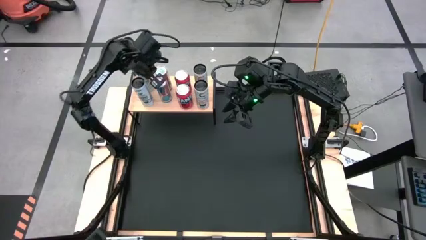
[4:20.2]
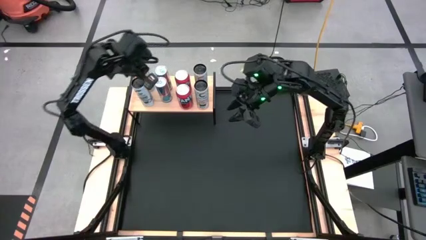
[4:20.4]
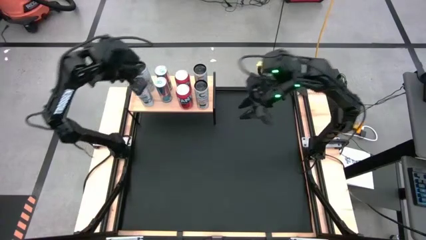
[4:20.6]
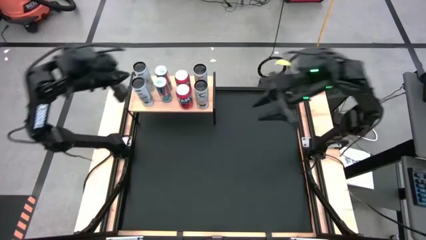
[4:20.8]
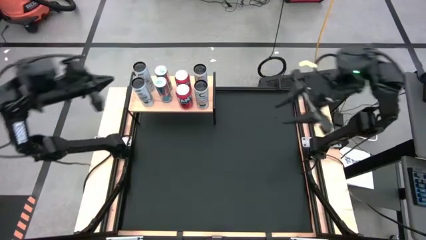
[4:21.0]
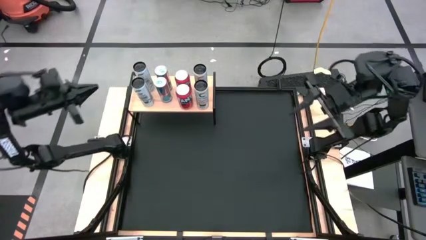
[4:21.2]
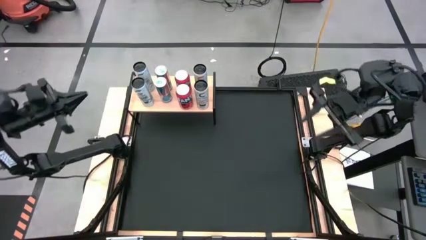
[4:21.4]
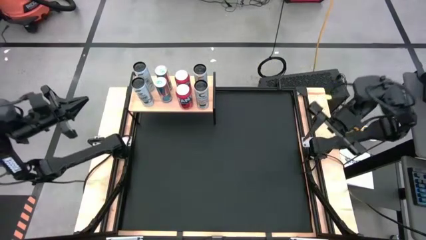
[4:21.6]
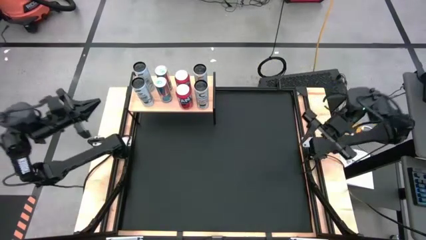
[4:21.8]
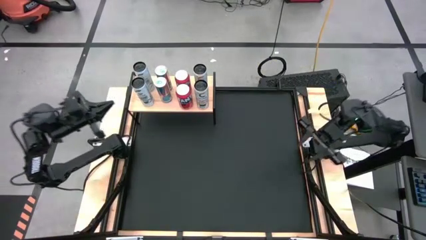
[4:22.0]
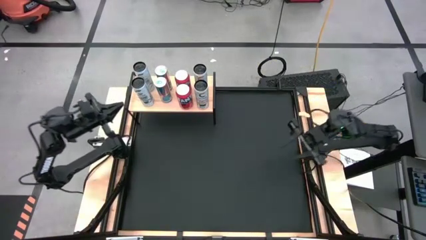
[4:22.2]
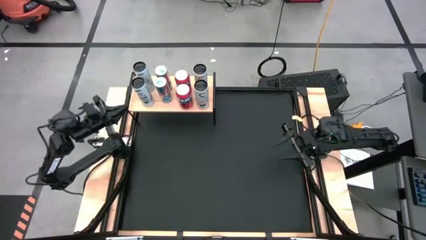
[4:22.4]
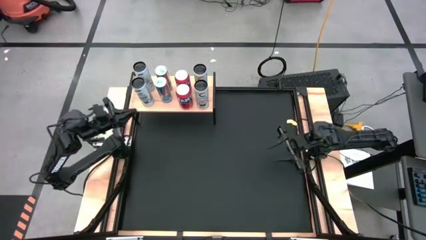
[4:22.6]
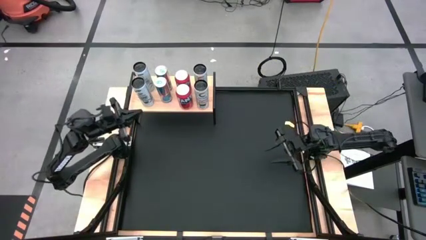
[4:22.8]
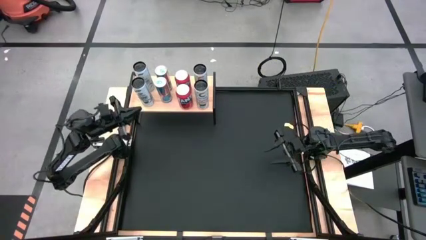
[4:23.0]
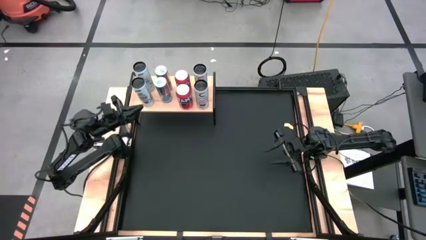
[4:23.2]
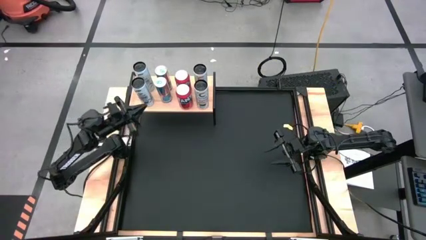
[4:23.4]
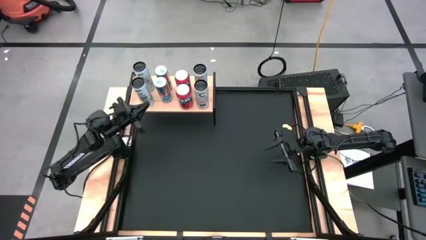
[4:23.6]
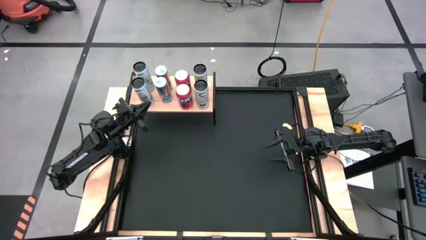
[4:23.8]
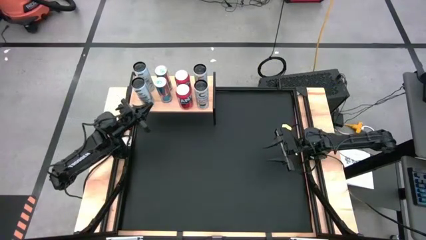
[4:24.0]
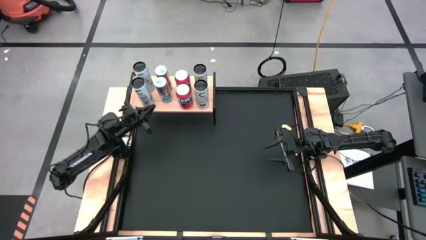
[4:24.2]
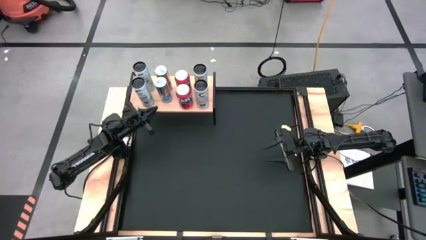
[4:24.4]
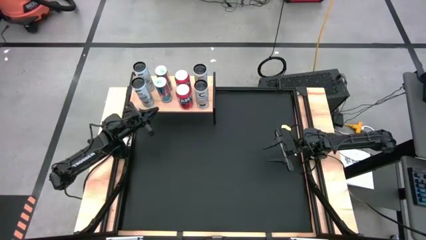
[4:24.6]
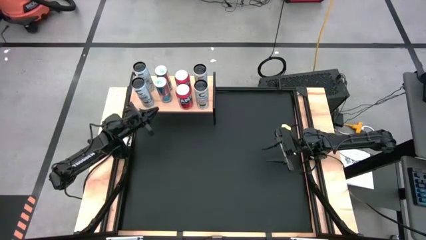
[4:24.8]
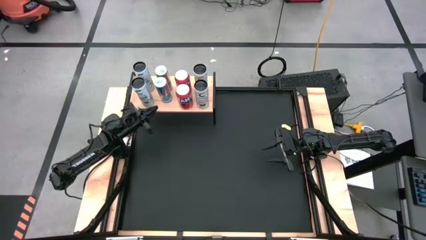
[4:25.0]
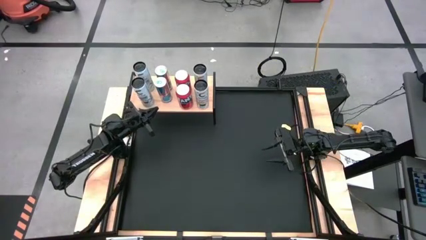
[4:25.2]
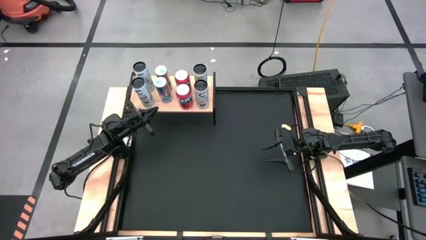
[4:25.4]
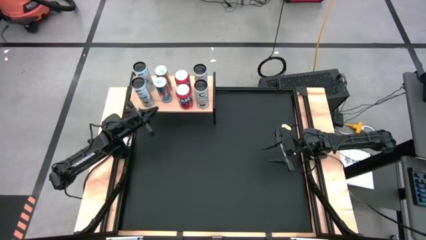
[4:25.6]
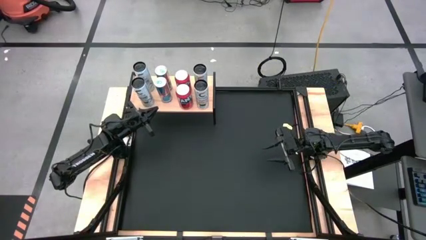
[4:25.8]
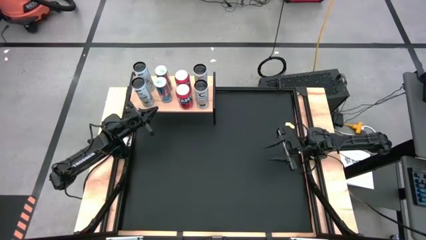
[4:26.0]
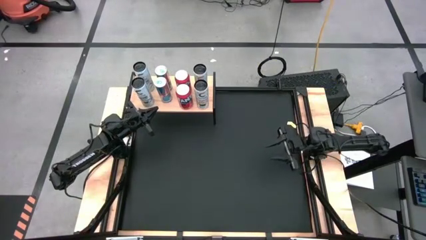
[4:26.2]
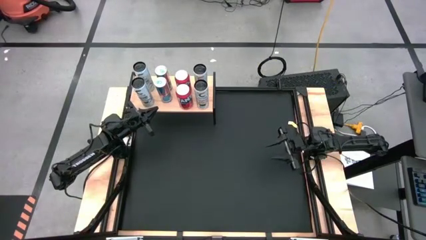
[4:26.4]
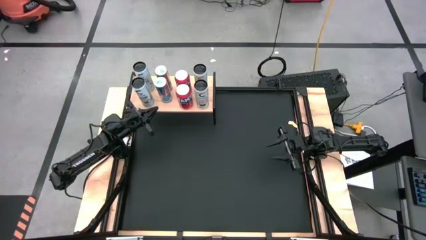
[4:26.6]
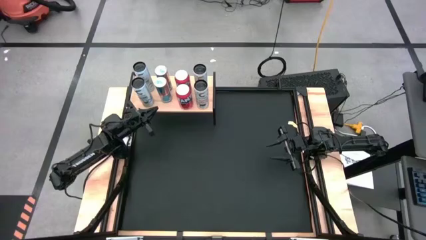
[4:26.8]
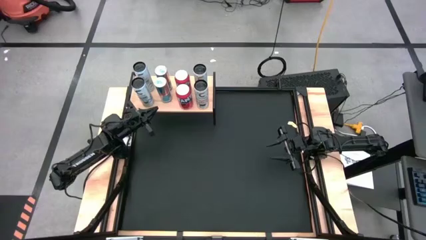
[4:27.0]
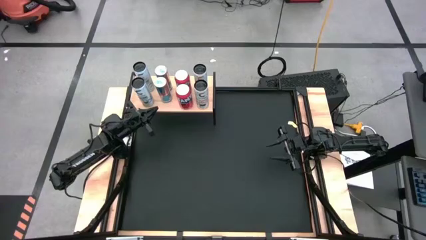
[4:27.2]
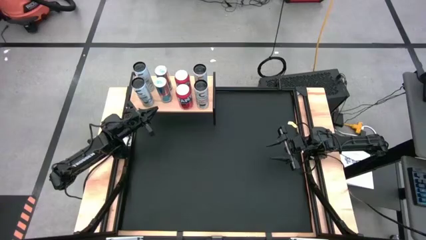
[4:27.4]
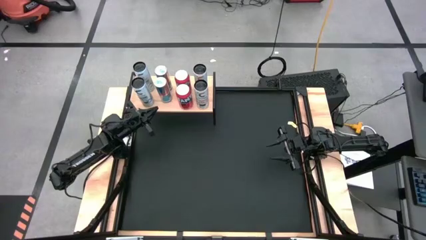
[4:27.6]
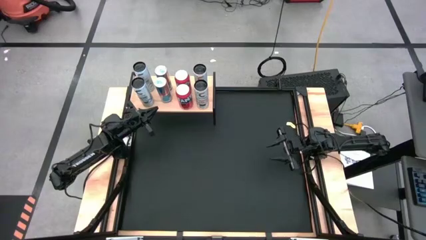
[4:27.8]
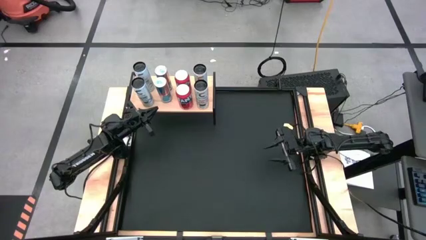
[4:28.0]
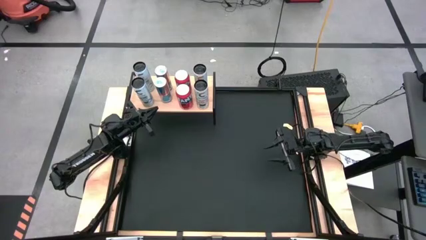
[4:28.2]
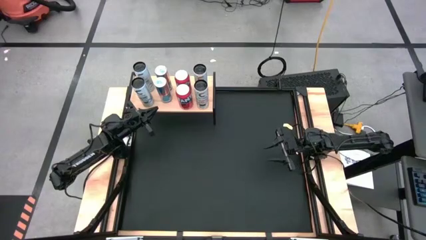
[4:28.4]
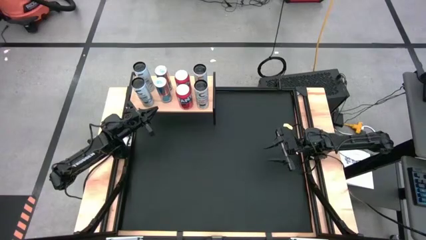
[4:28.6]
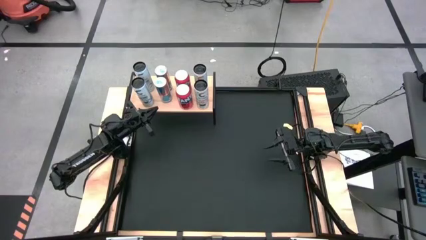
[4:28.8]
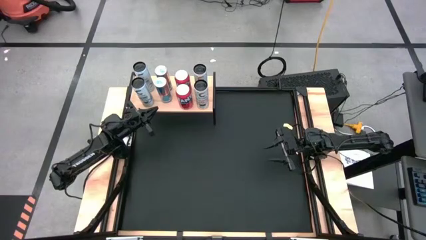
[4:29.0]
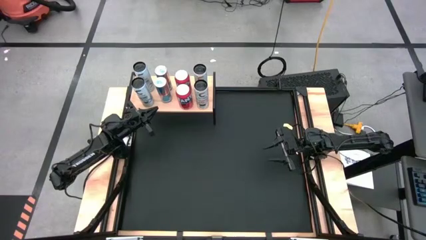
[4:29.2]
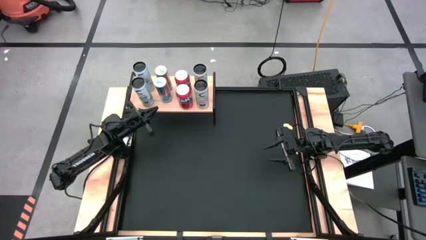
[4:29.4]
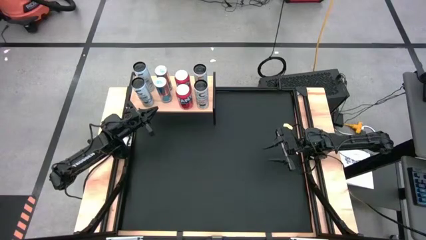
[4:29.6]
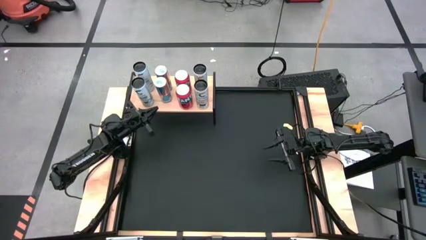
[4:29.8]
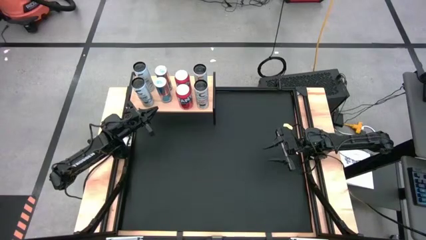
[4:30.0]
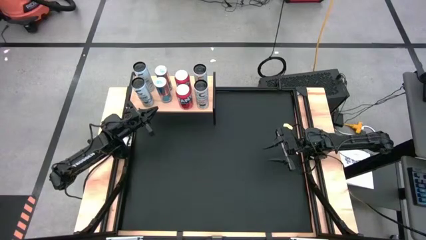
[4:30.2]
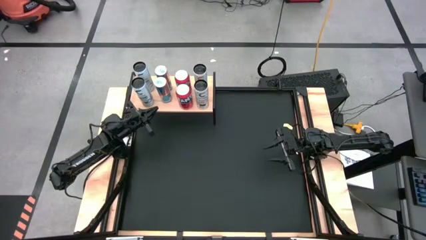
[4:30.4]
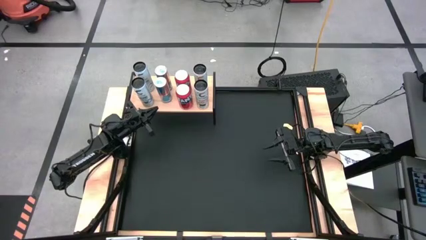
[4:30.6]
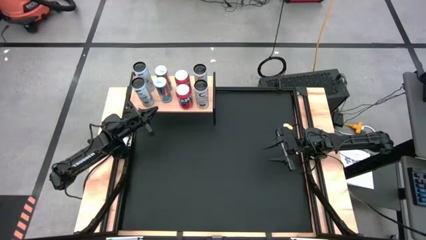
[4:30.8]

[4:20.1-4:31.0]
Task: Place canned beverage on shelf
Return to Home Position
